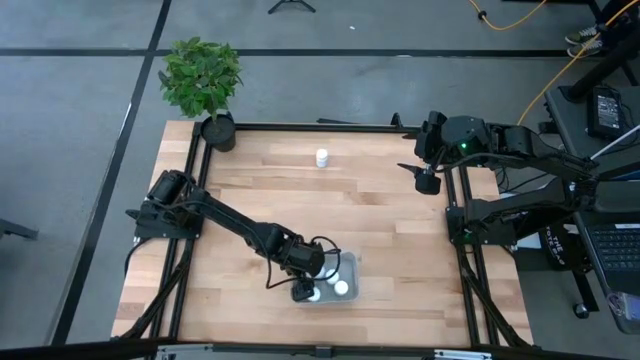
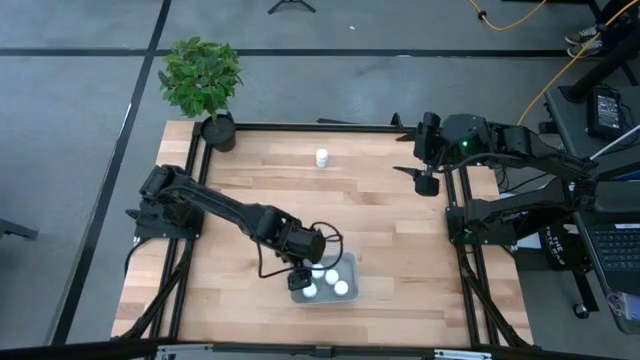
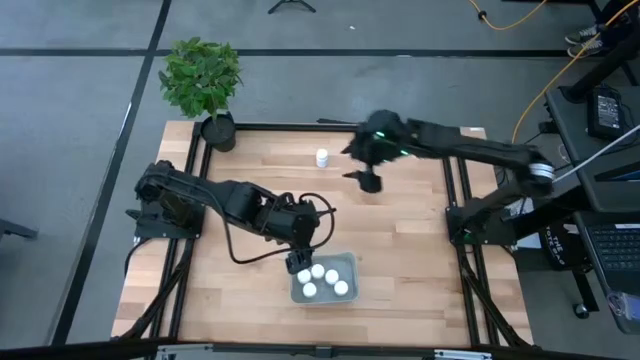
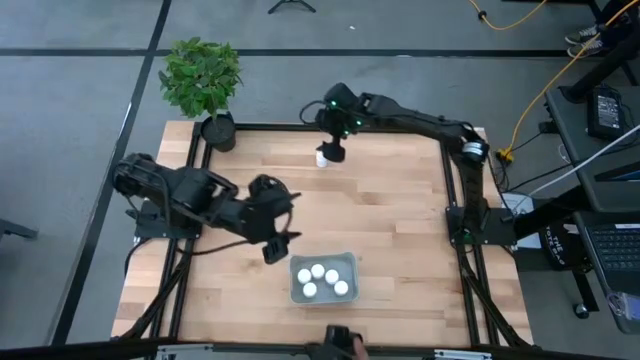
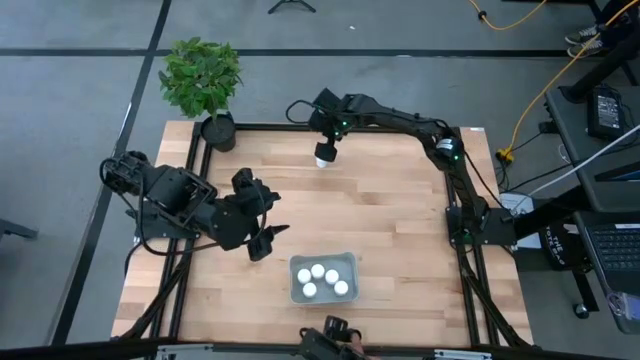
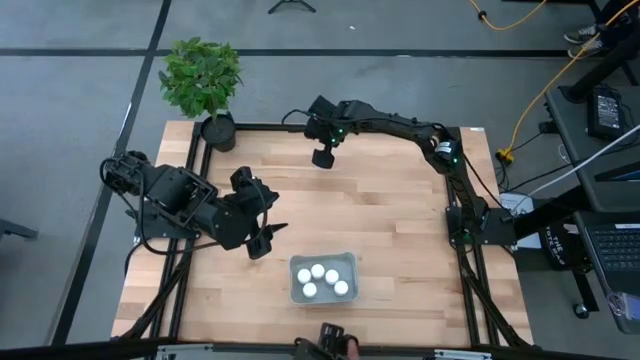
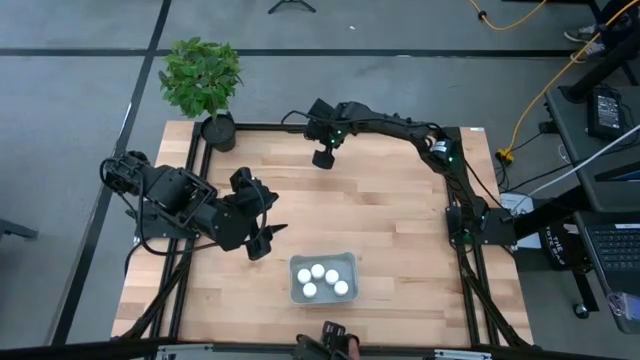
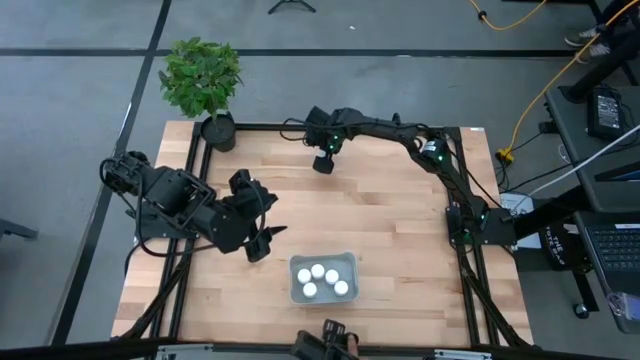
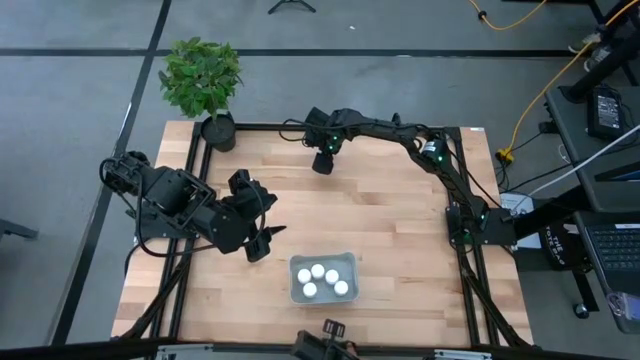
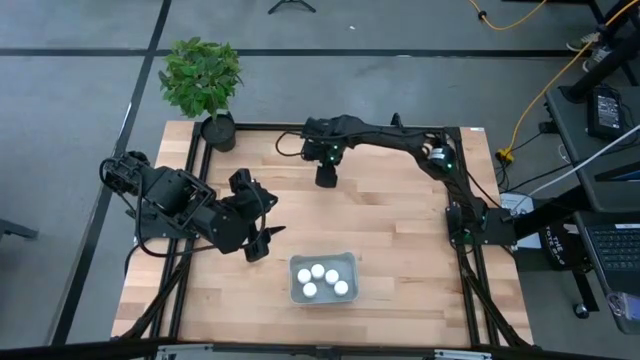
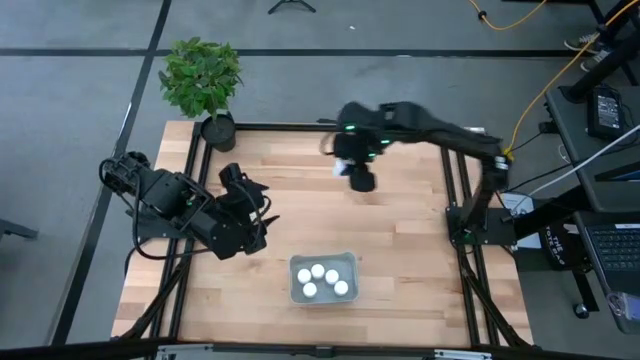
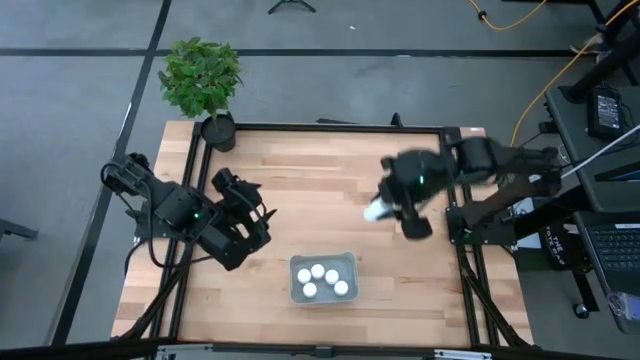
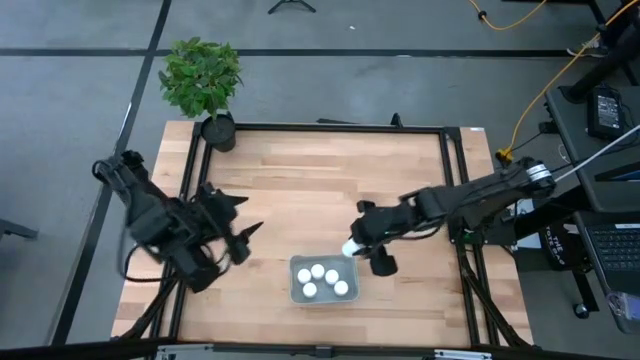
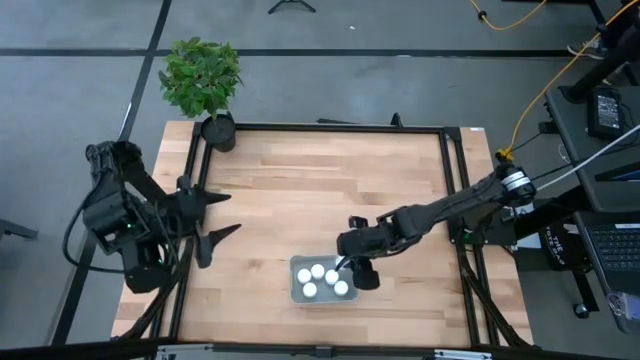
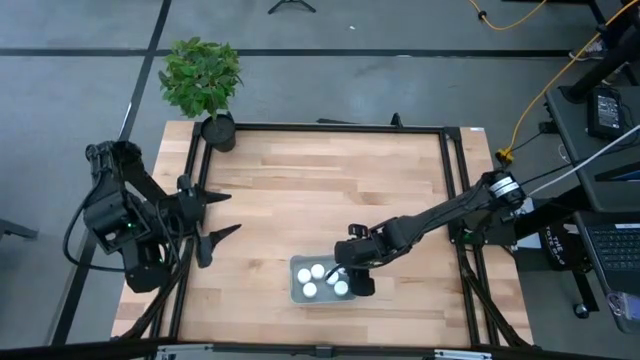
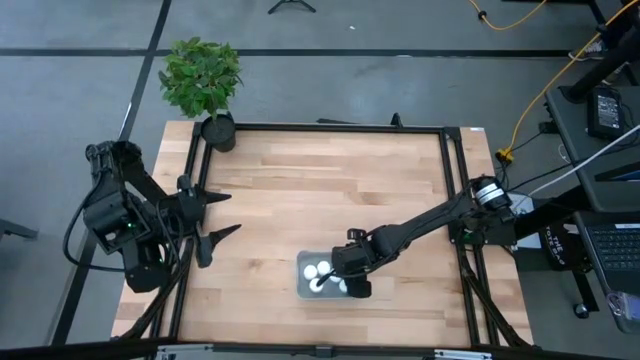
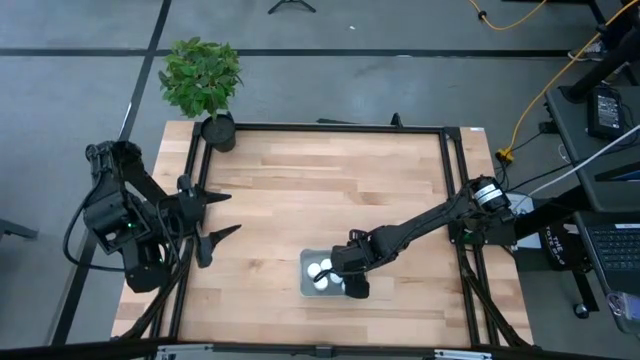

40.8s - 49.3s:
Task: Pick and place pill bottles into a basket
Put the white medicine bottle into the gray bin

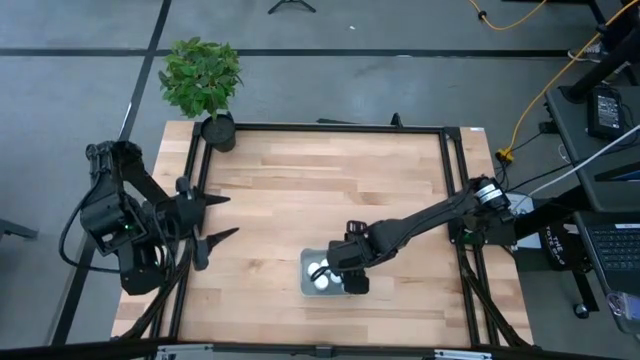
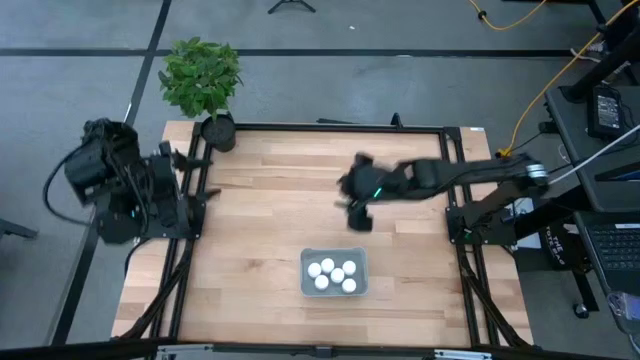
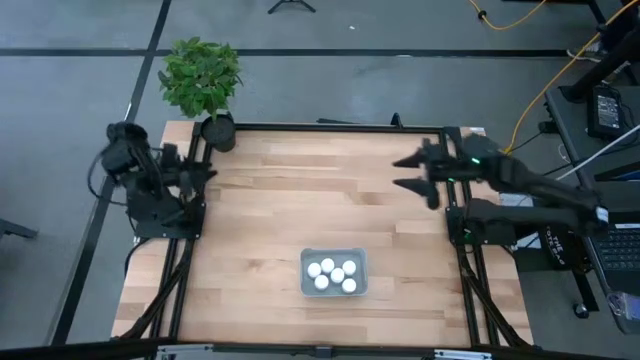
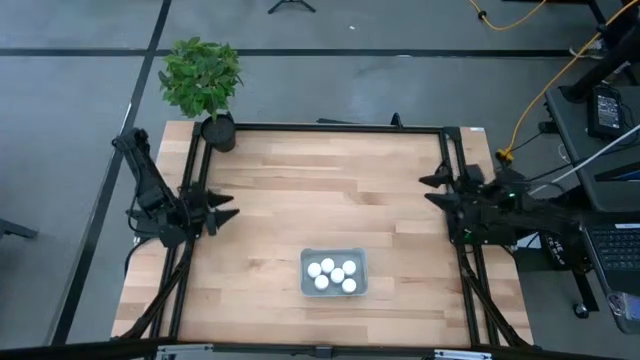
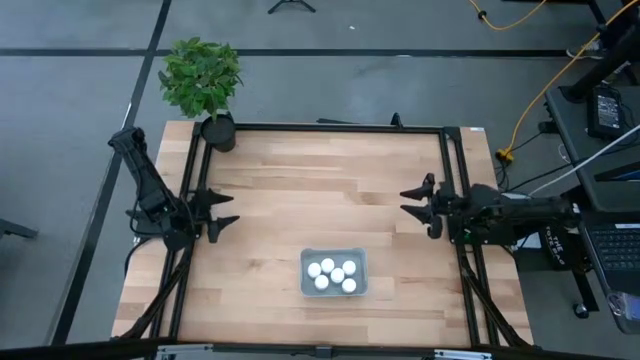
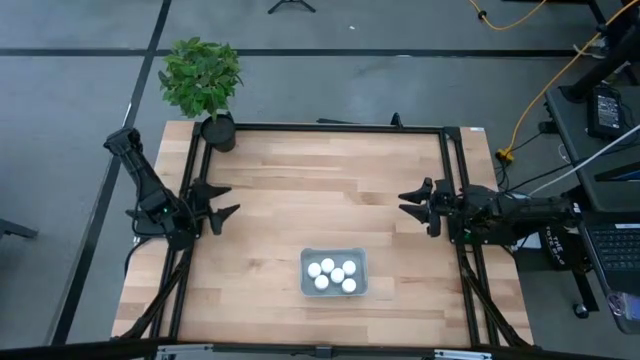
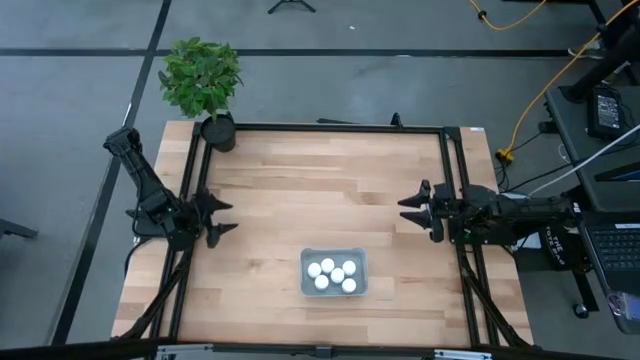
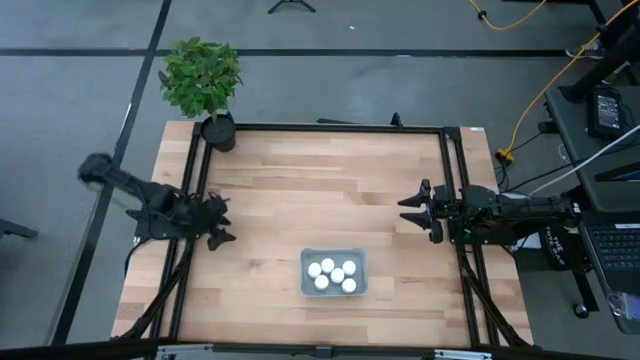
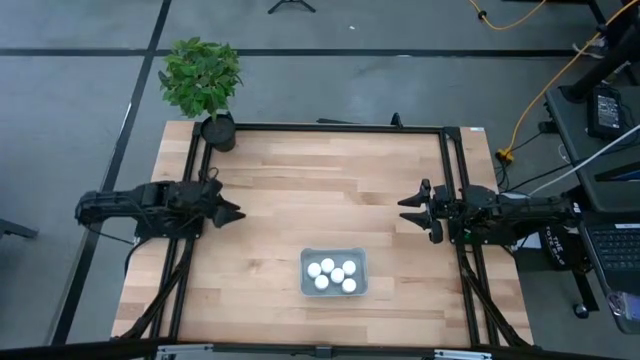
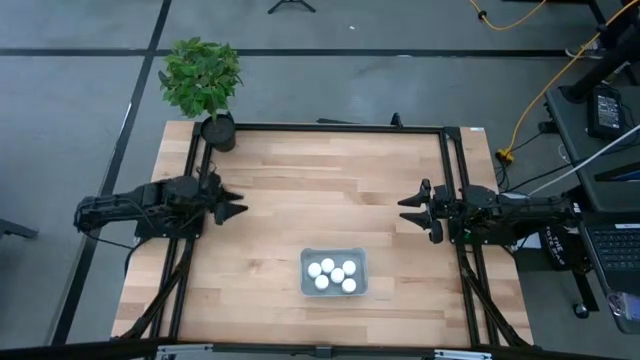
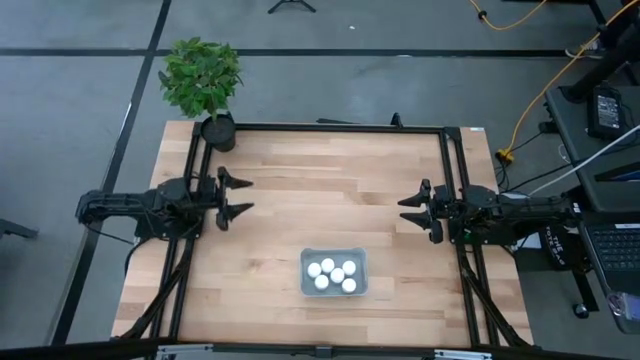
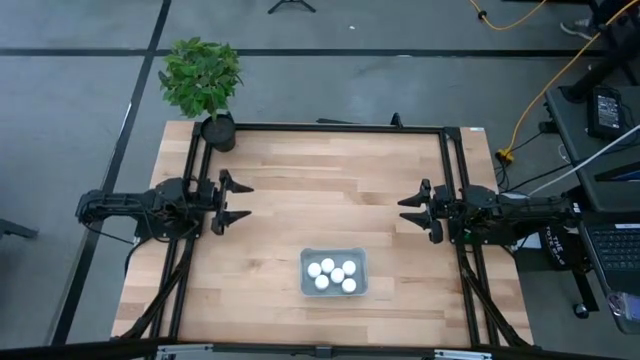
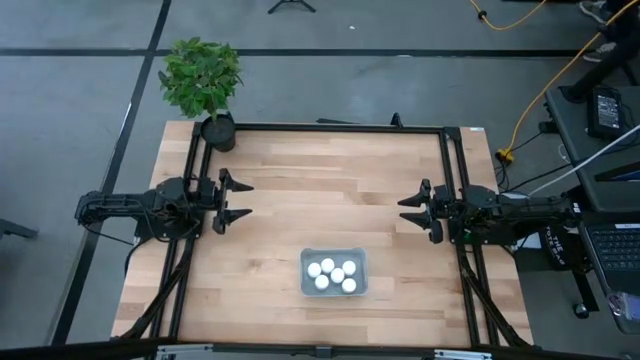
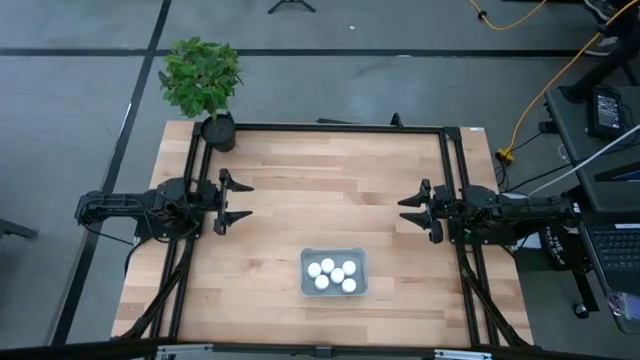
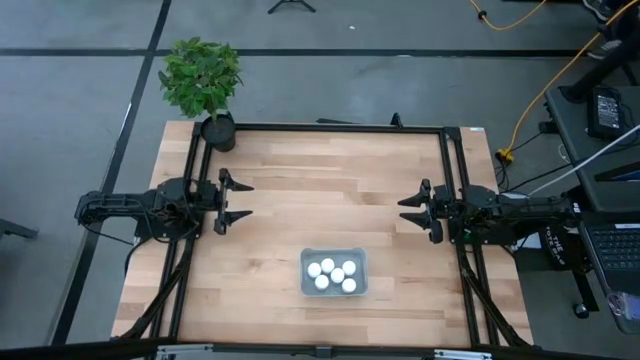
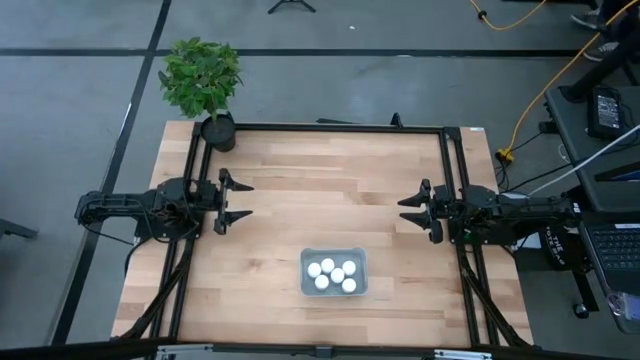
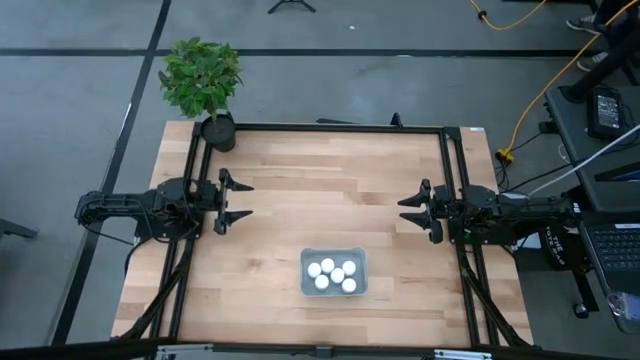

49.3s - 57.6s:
Return to Home Position

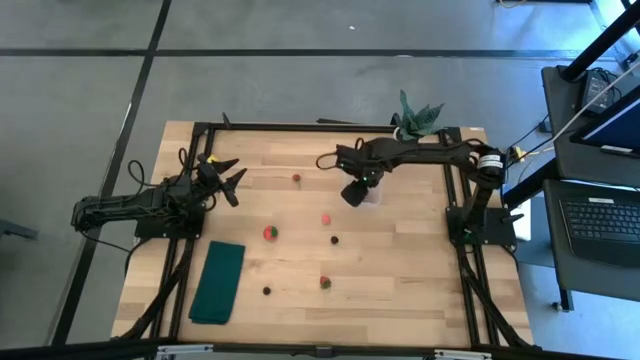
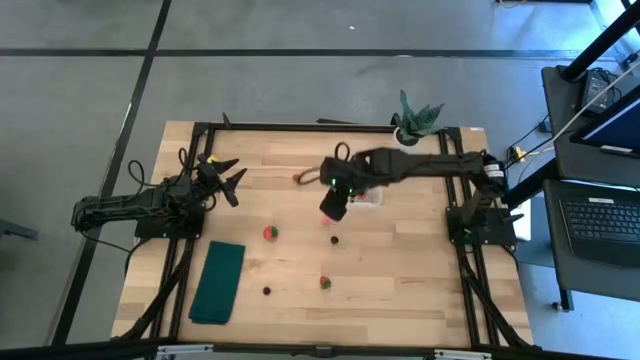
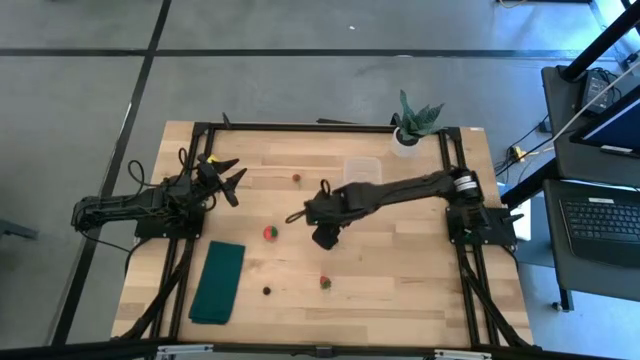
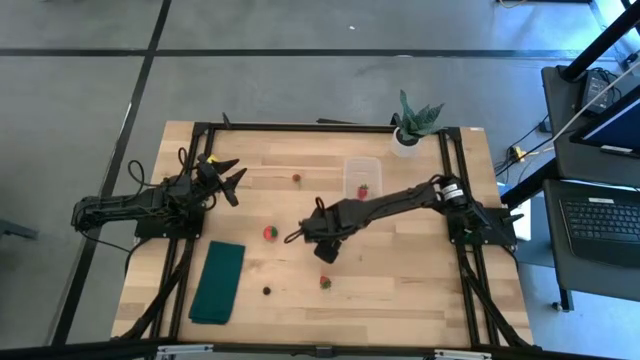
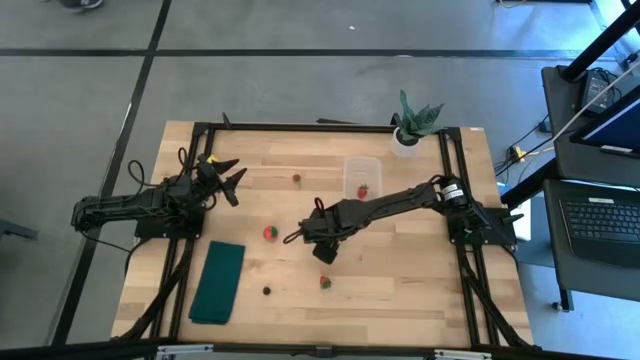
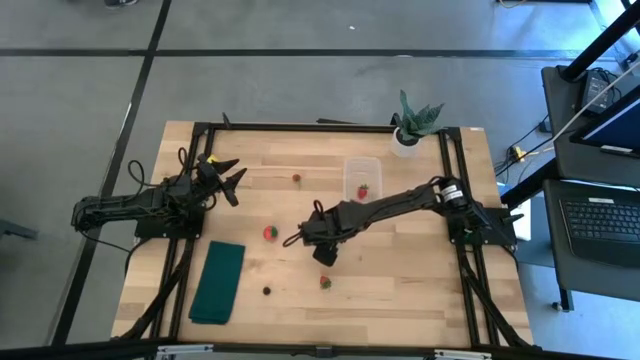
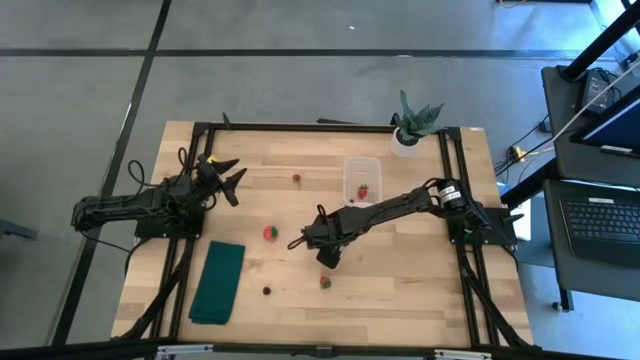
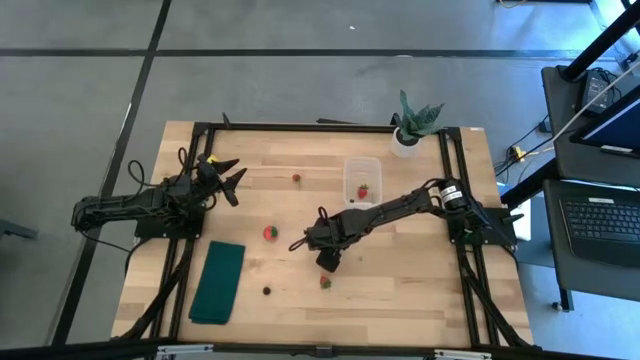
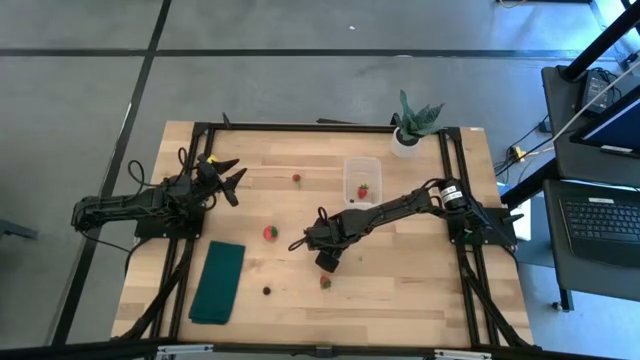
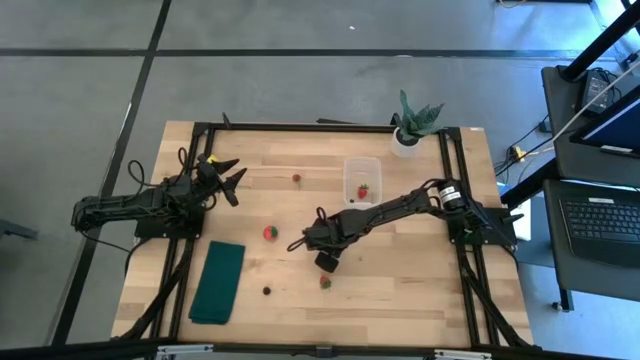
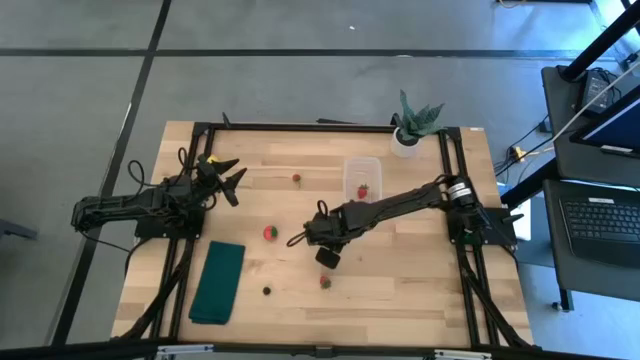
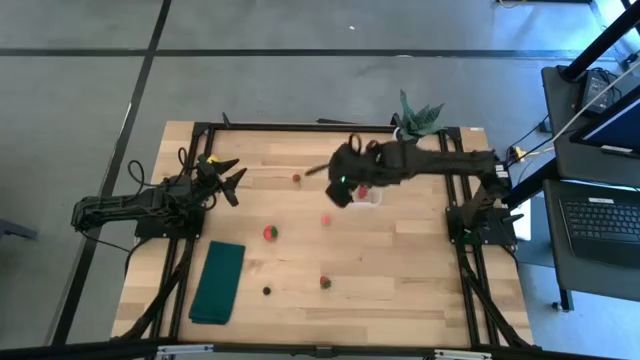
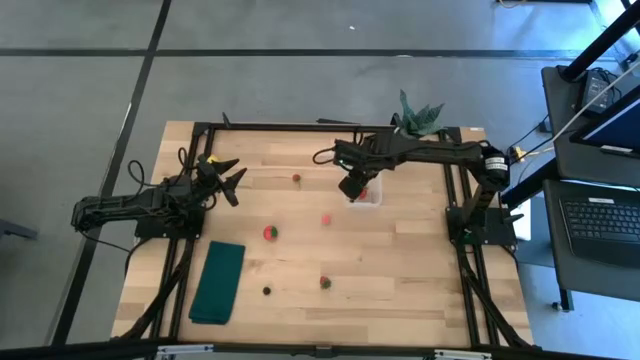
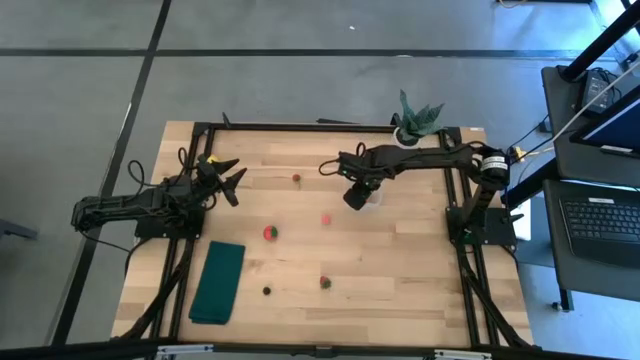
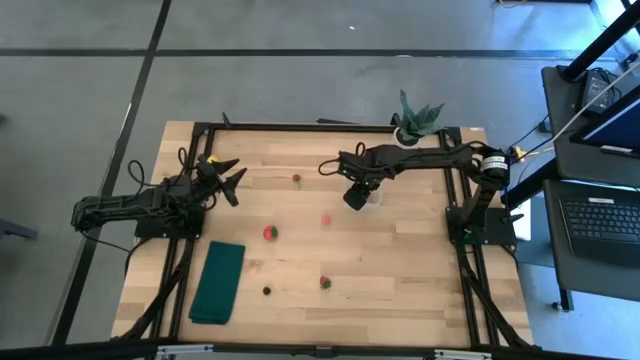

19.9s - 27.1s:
Task: Pick and placing Produce into tupperware
Put the black cherry into the transparent container
